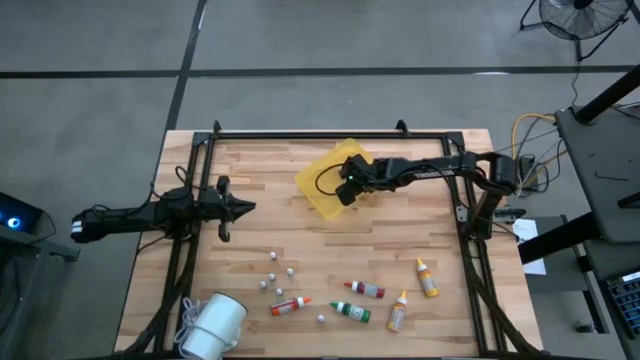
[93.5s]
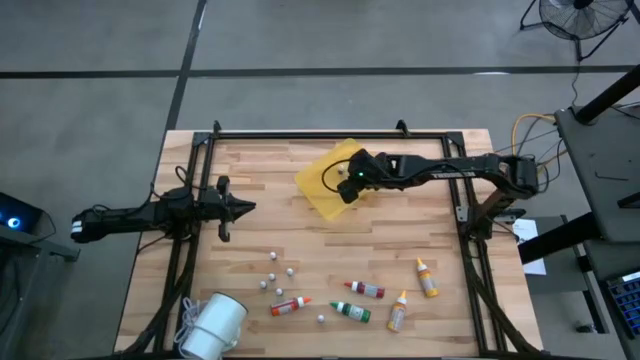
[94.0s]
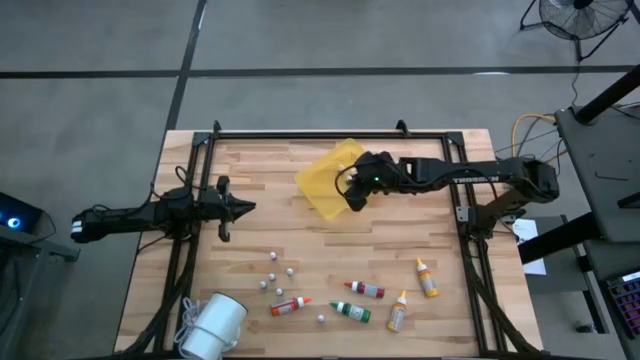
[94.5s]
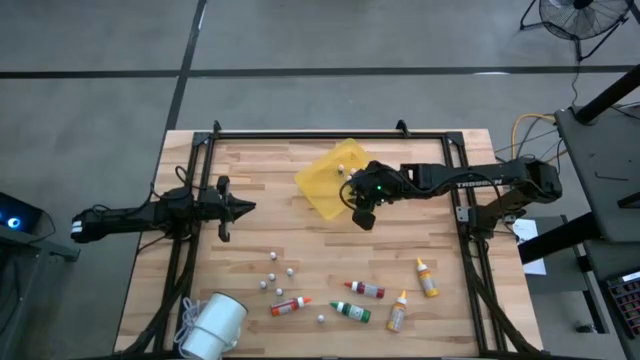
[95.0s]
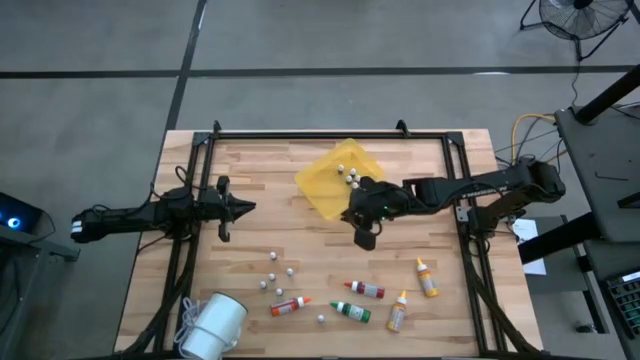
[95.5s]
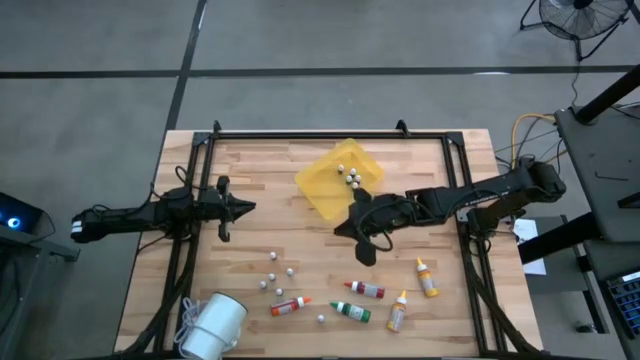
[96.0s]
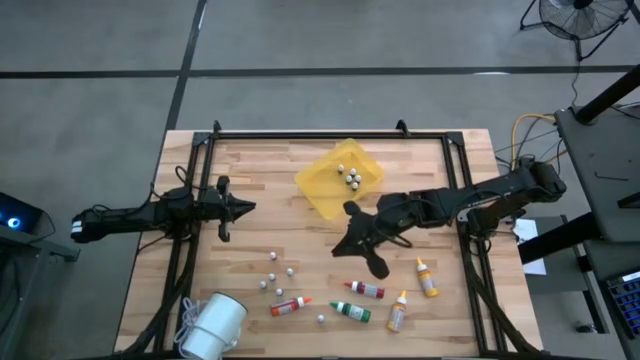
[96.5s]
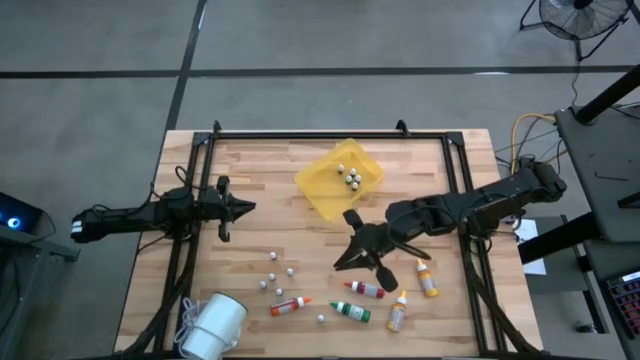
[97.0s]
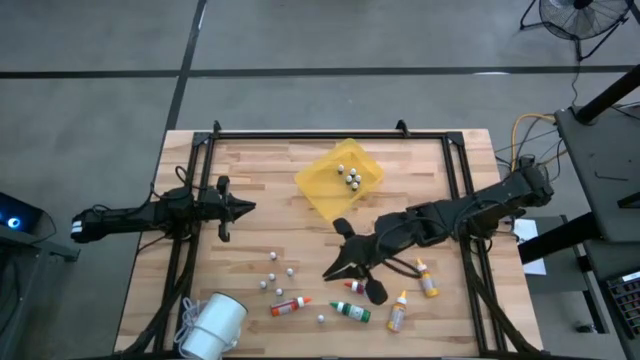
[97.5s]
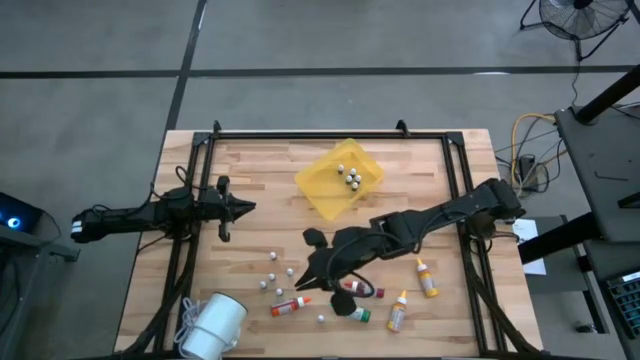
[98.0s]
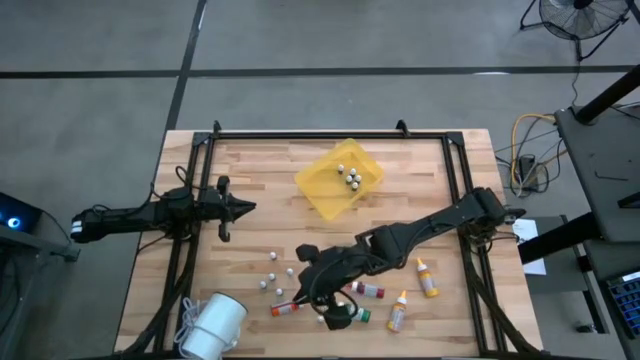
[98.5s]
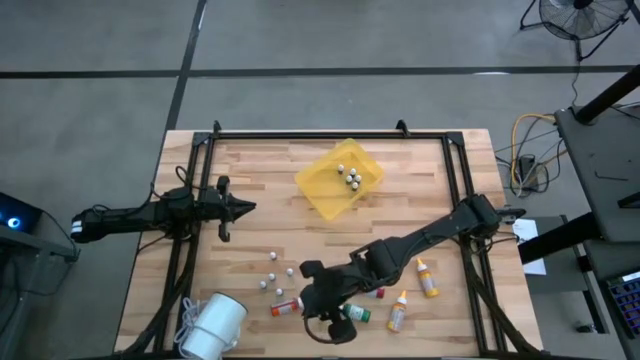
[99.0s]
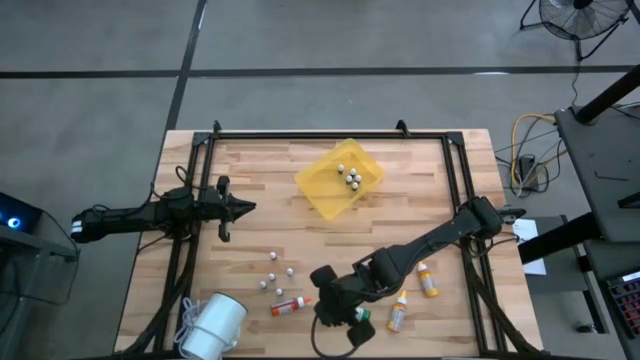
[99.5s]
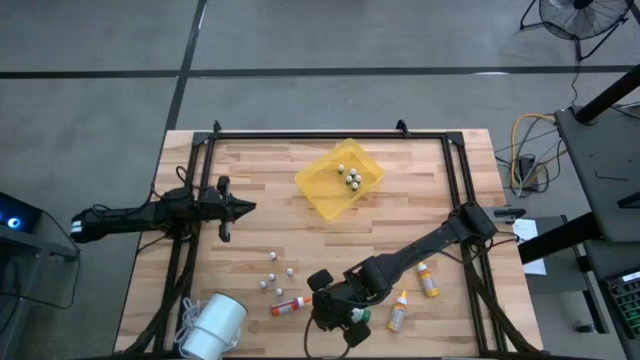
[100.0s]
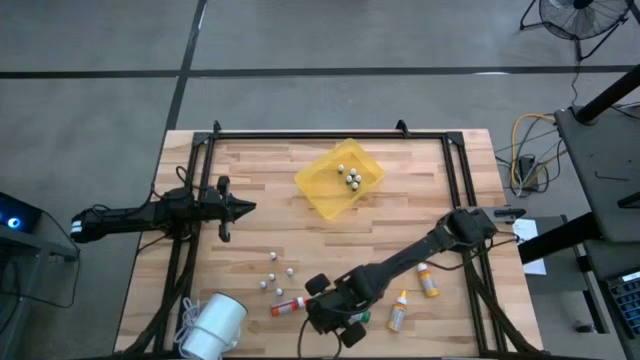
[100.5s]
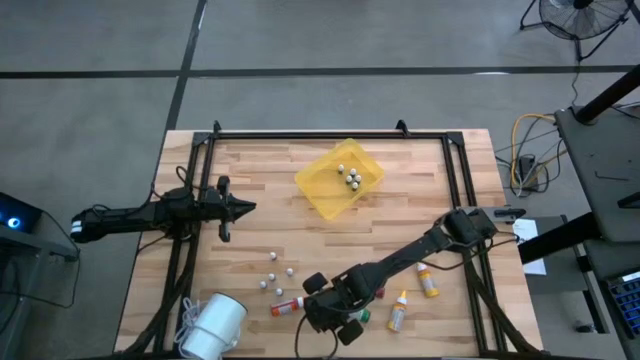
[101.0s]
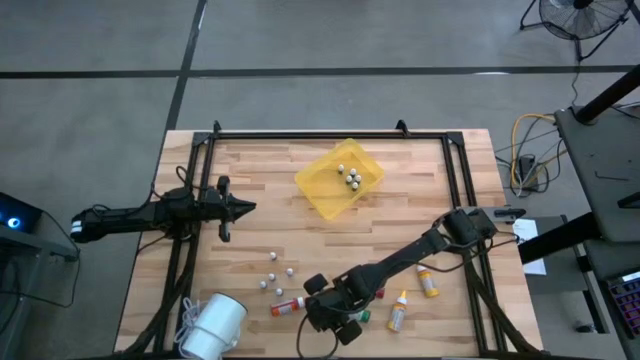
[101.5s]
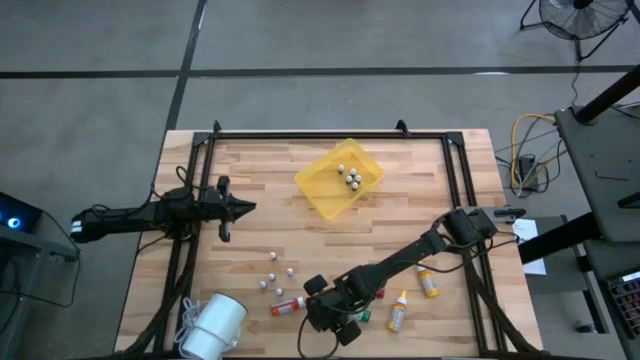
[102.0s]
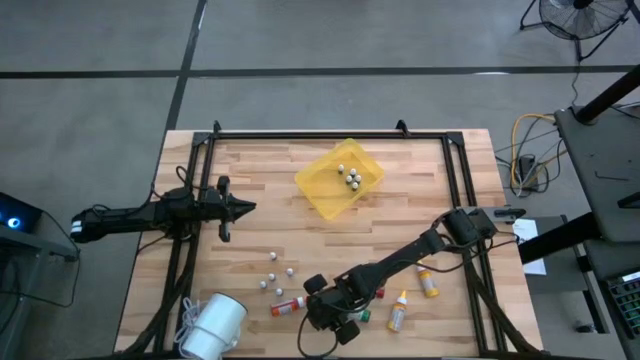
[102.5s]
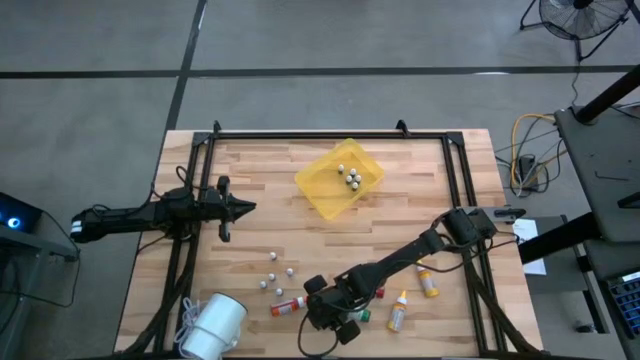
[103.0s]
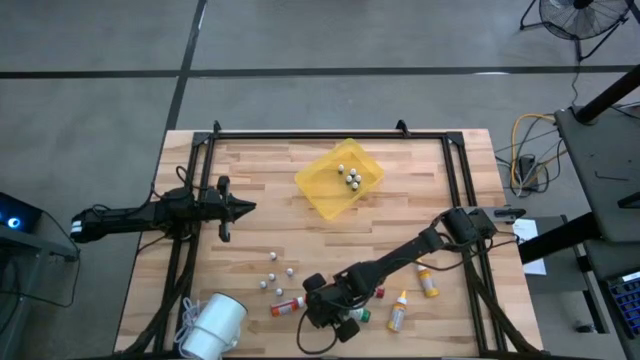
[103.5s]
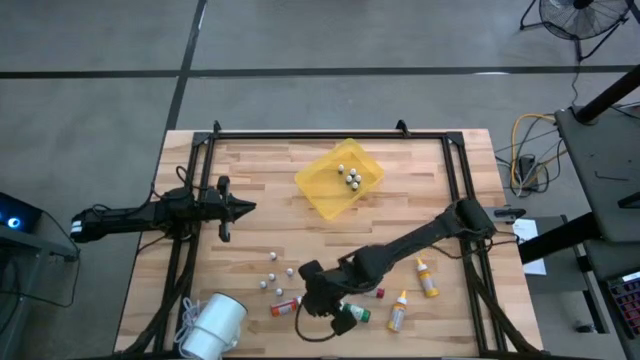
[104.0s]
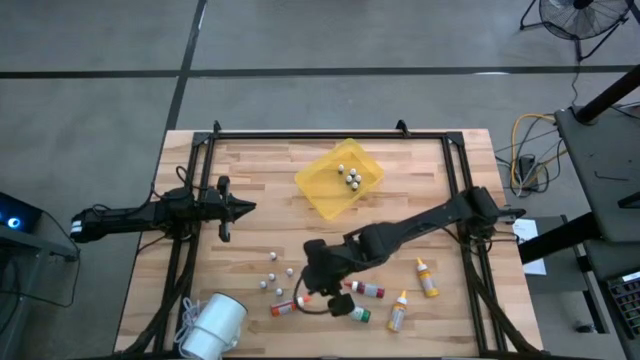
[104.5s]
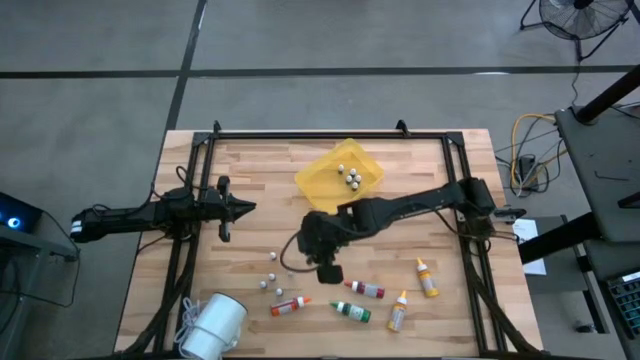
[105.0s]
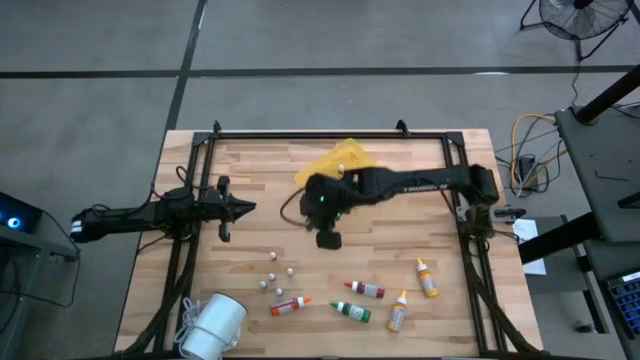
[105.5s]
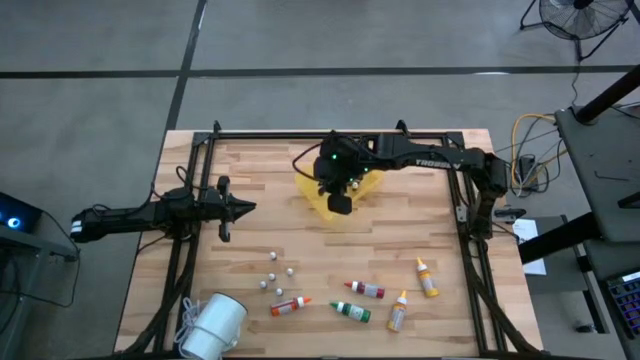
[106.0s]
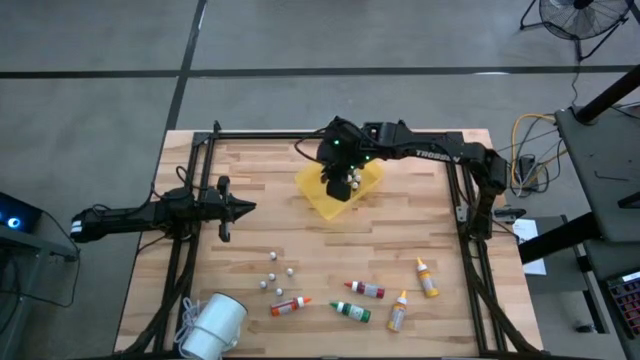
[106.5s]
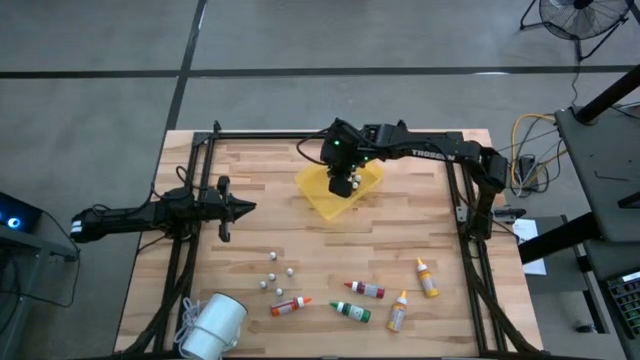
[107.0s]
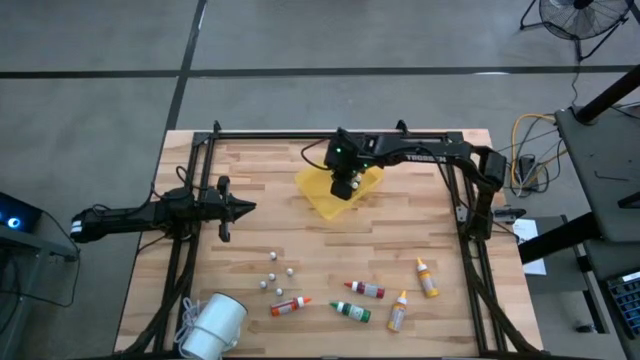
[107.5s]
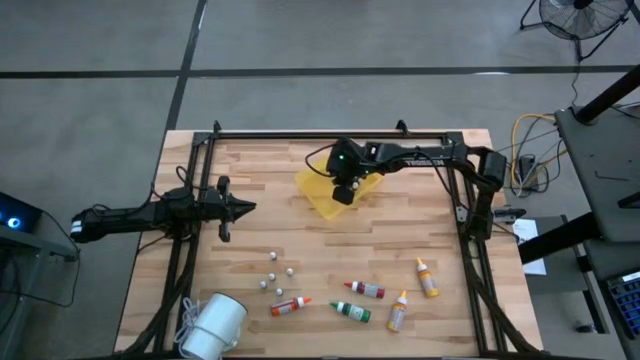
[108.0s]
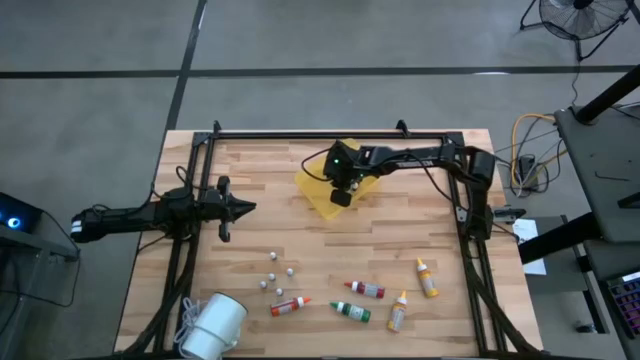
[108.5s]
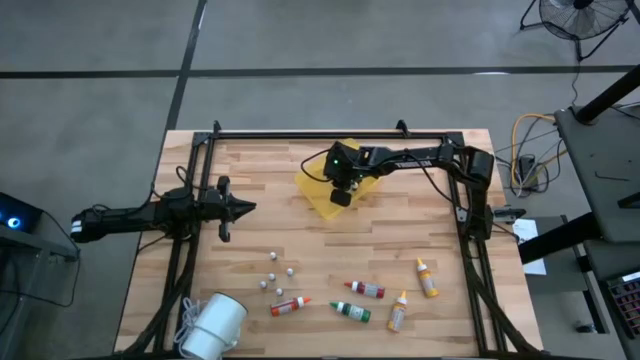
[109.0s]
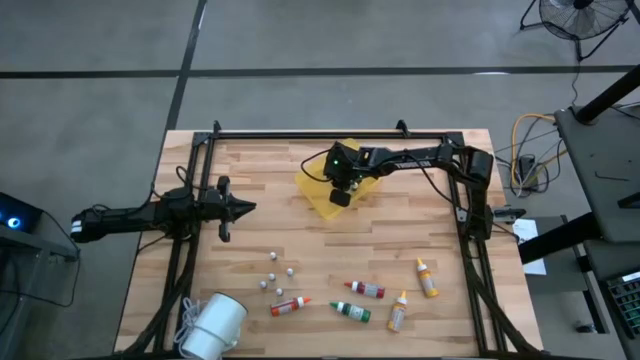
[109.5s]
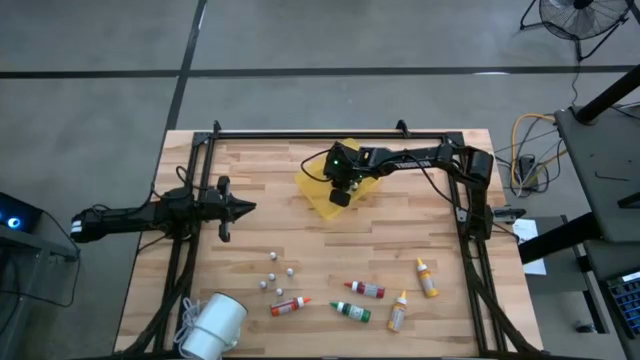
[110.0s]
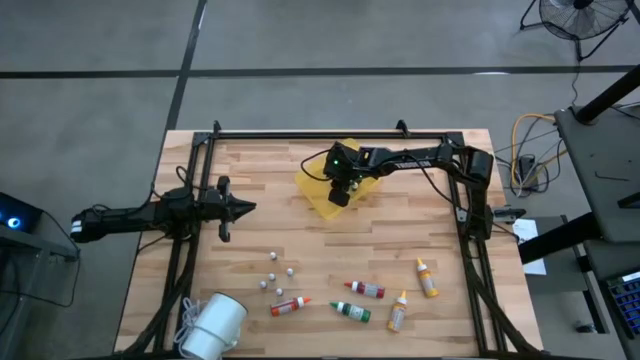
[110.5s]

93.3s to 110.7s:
Task: Pick & Place food coloring
Put the small black food coloring bottle into the yellow bin
